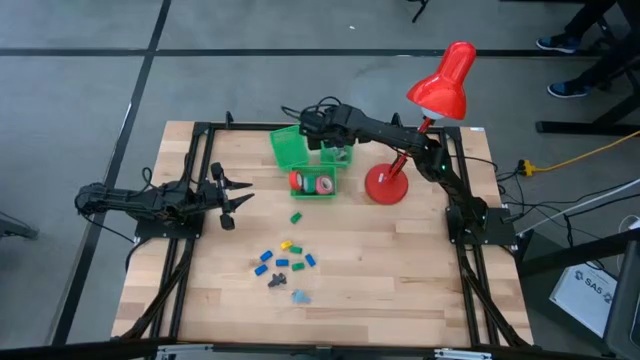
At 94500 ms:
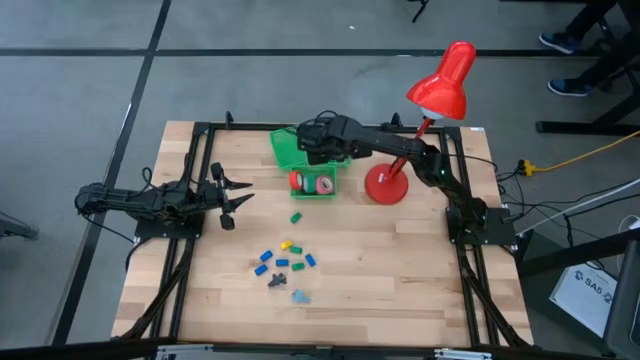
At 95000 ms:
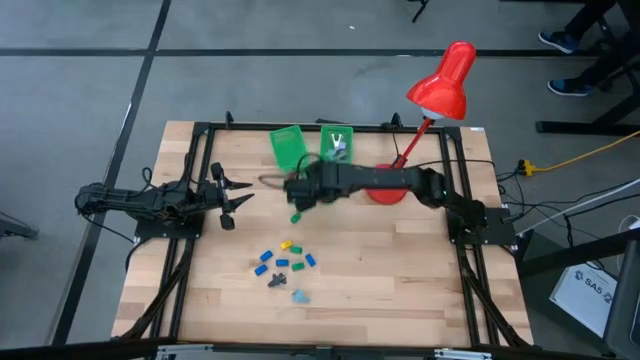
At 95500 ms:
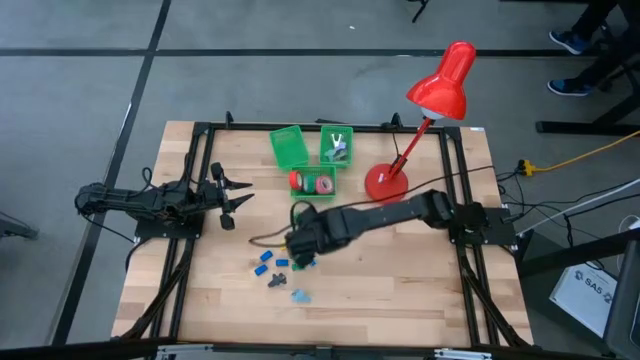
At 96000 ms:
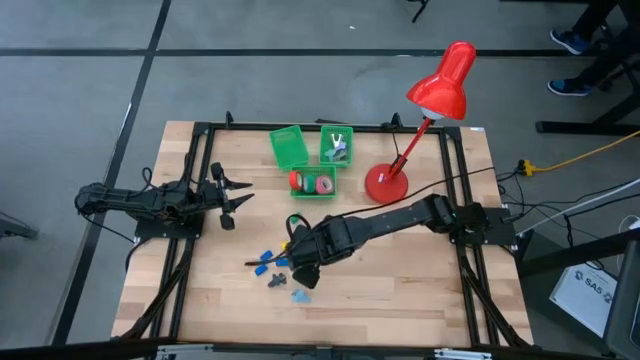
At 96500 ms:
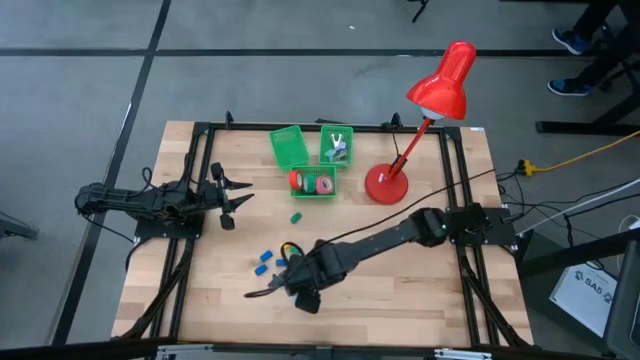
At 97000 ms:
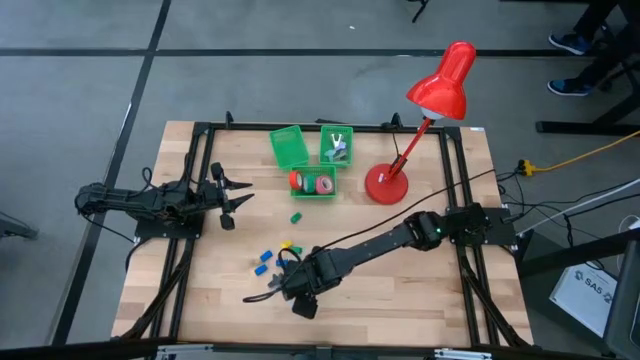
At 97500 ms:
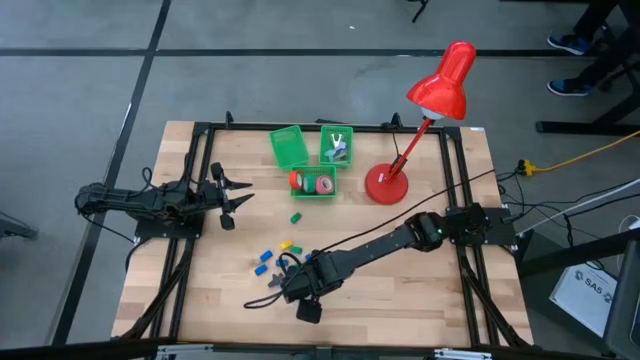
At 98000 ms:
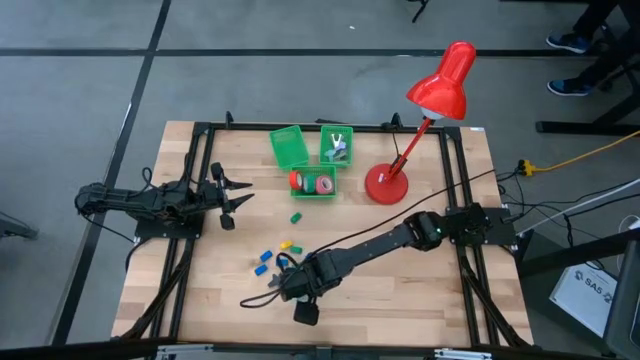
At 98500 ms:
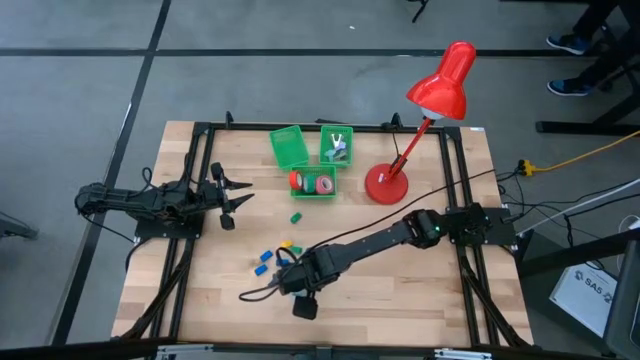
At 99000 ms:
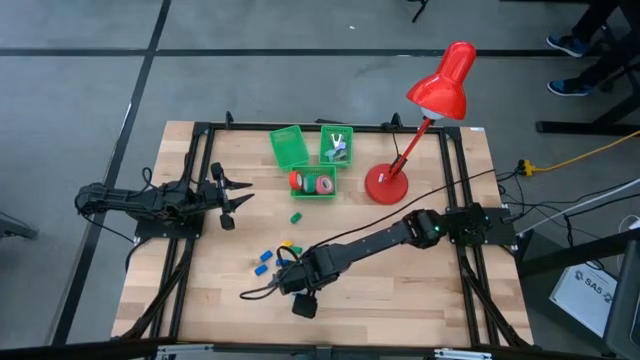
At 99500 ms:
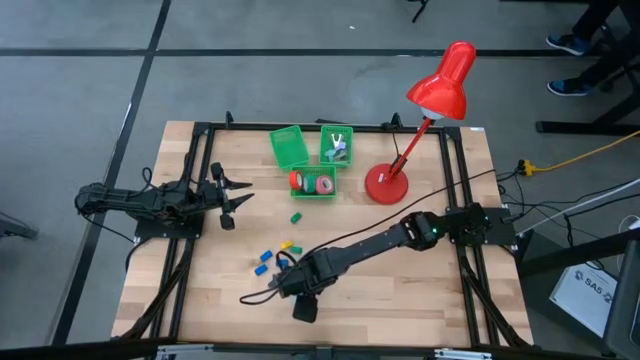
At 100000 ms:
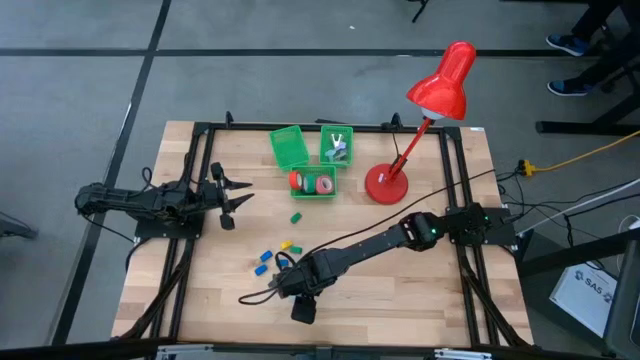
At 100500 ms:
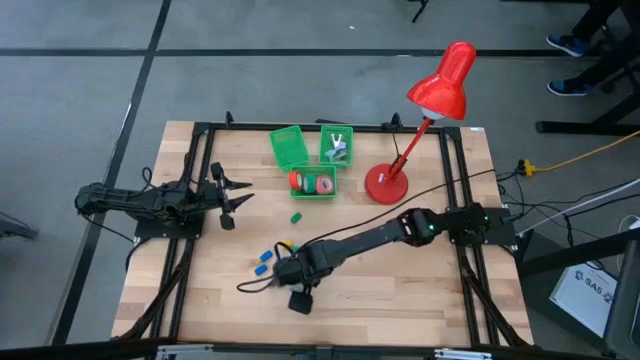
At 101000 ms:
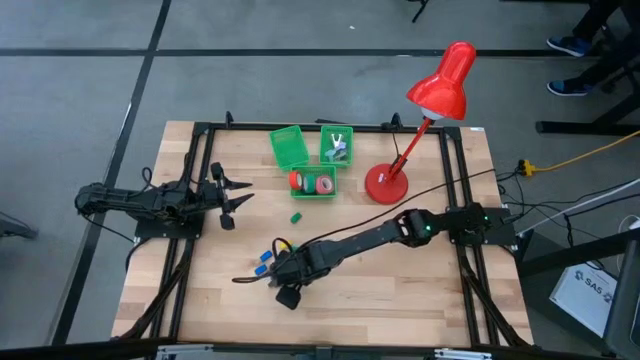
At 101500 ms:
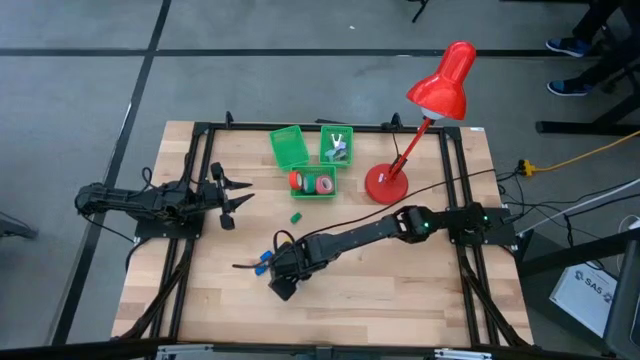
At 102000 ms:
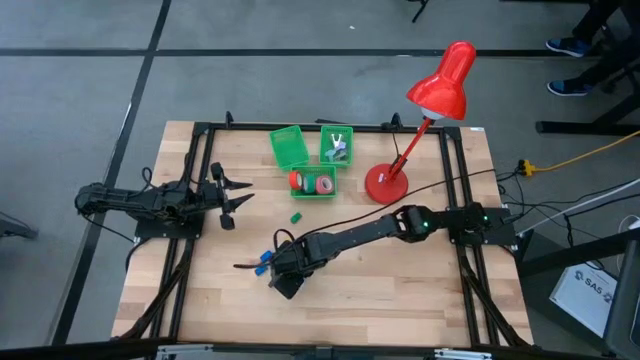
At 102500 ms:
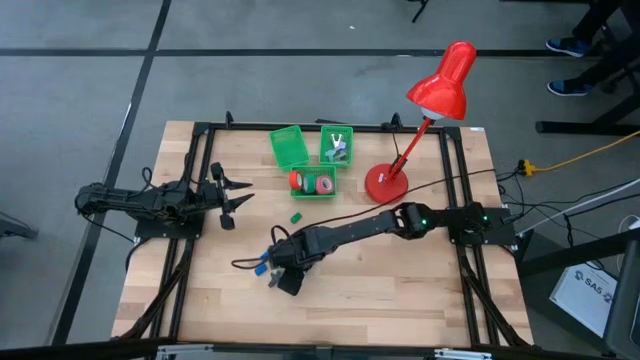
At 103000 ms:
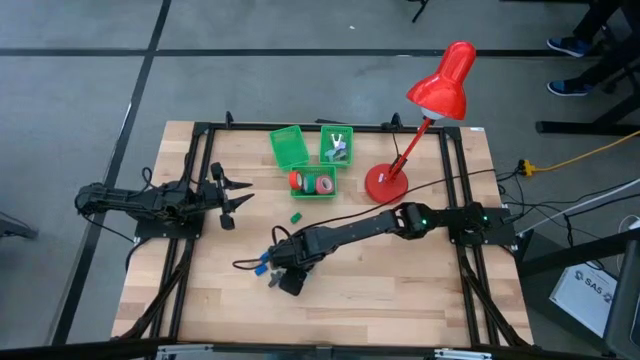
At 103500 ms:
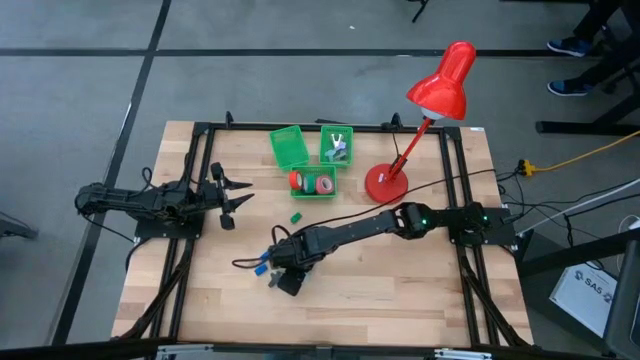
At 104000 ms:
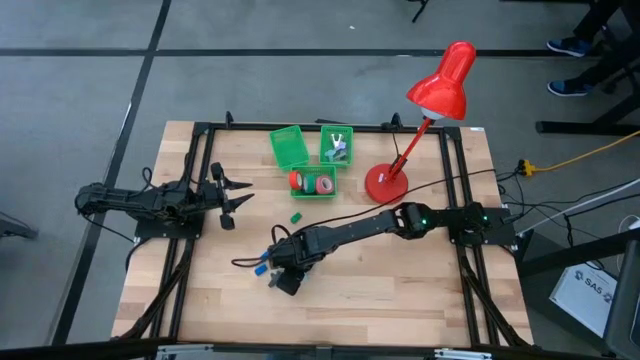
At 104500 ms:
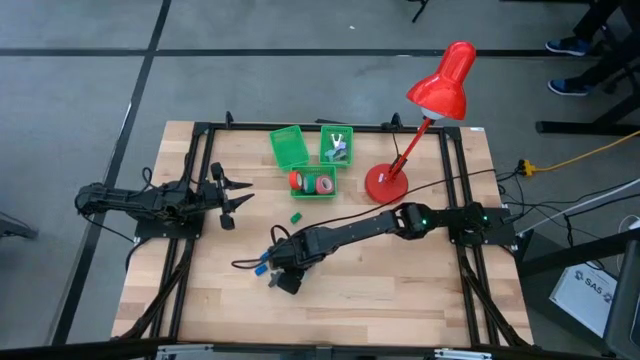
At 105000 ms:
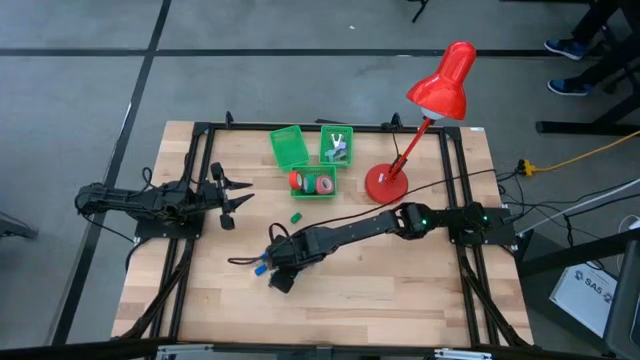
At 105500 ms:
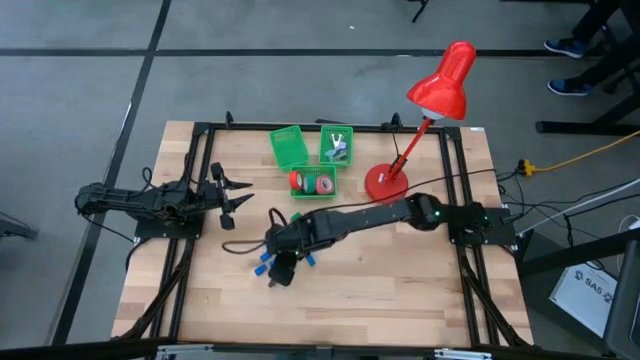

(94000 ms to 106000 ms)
Task: Pick and place Stapler, Stapler remover, tape
Put the blue staple remover into the right green bin

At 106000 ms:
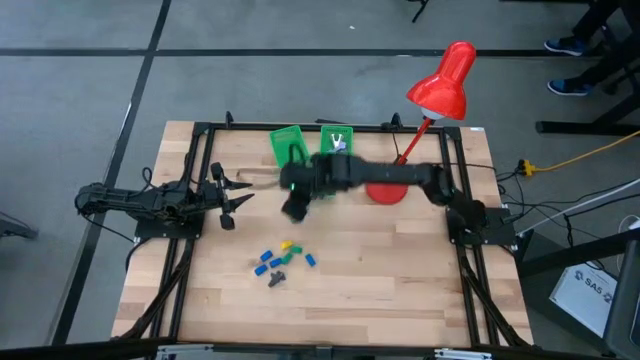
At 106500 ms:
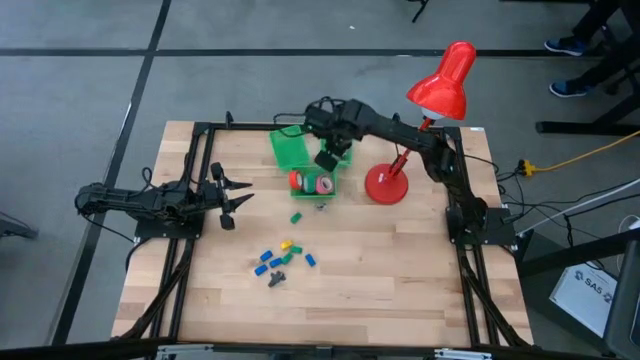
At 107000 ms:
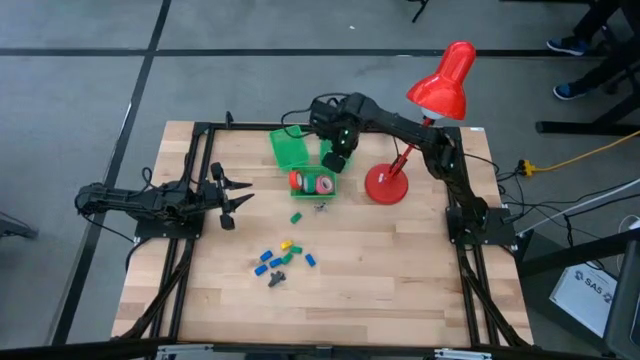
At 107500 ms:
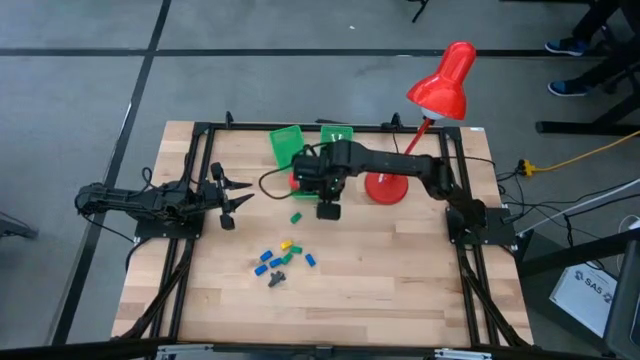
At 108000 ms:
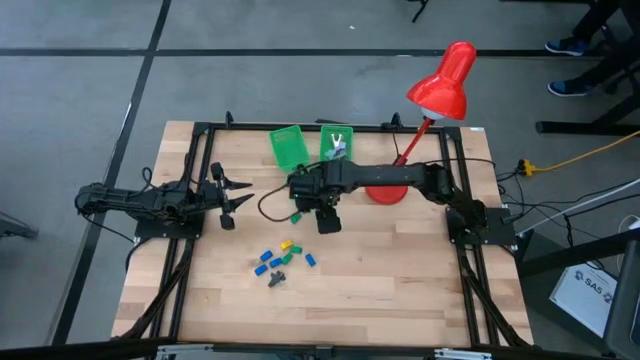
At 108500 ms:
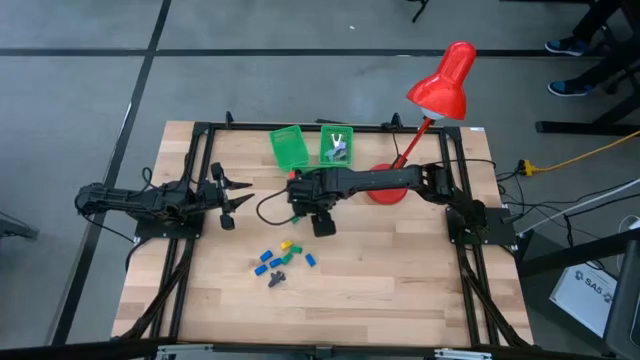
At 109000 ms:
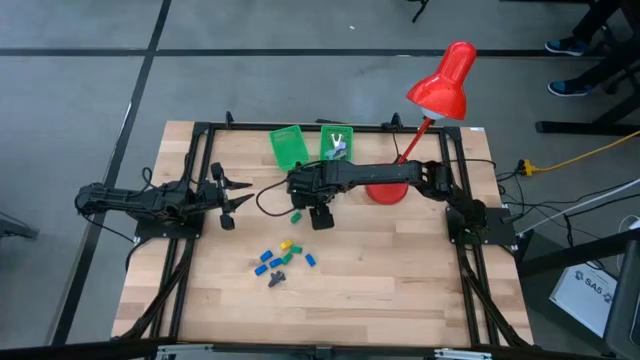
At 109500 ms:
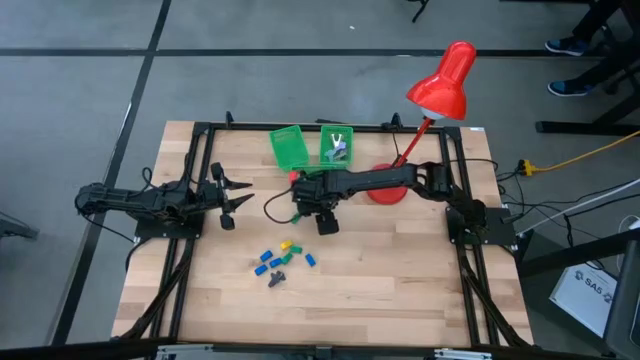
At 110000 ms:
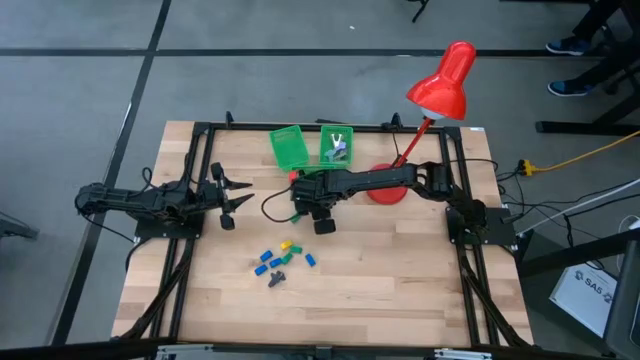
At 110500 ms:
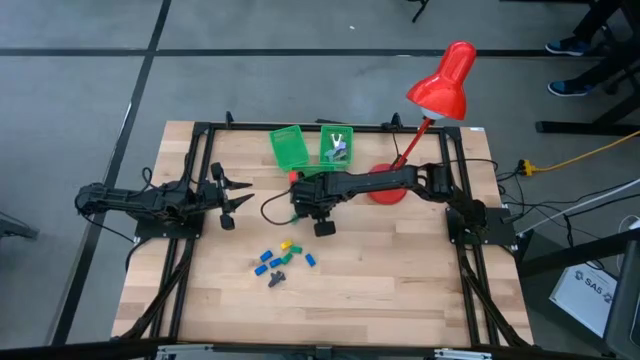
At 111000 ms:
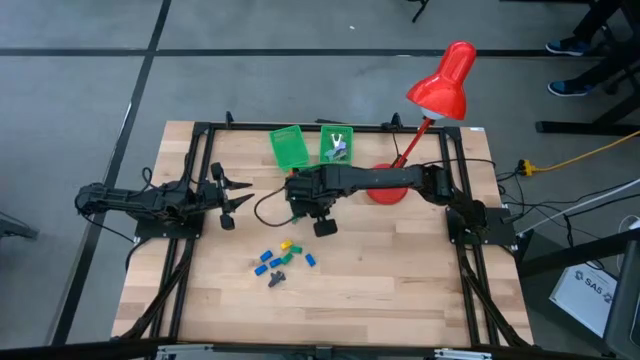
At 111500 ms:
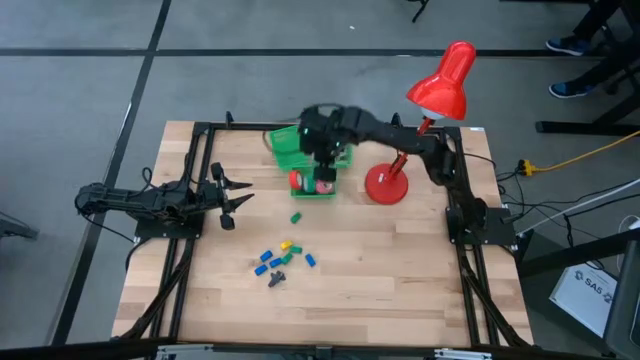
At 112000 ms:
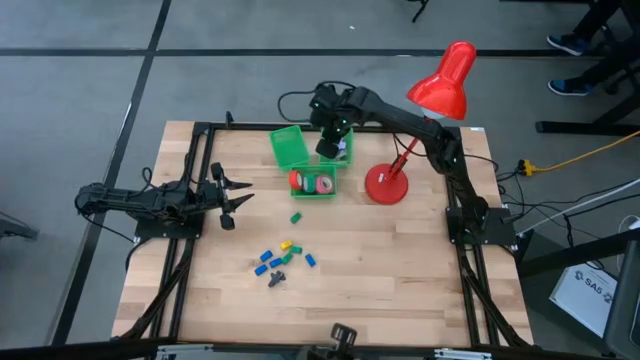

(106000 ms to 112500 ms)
Put the blue staple remover into the right green bin

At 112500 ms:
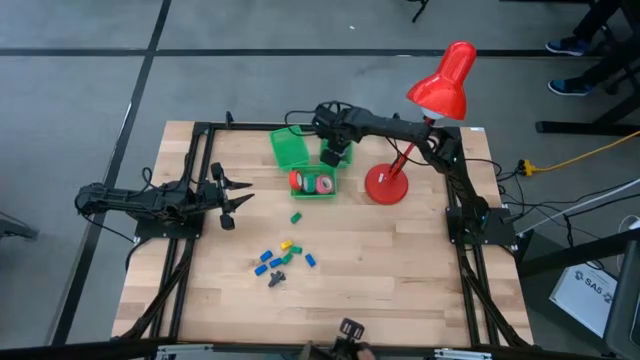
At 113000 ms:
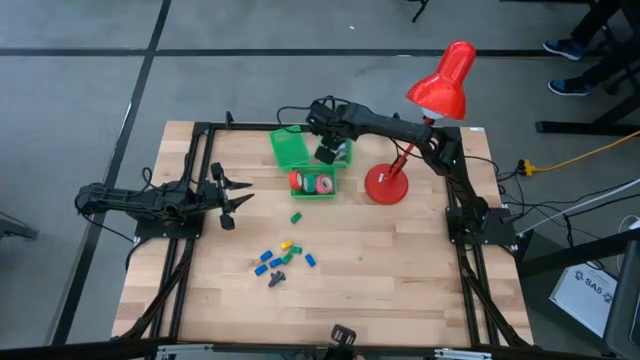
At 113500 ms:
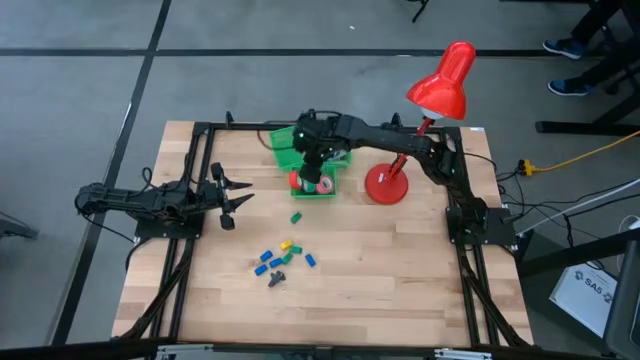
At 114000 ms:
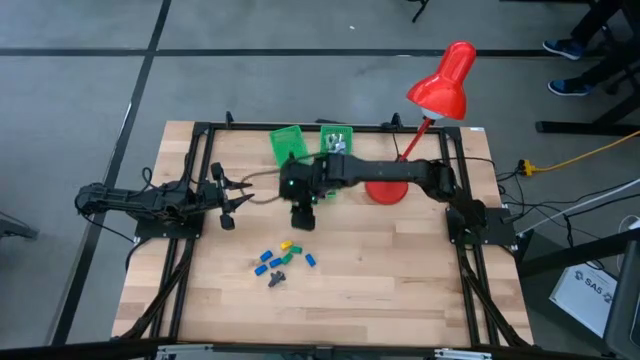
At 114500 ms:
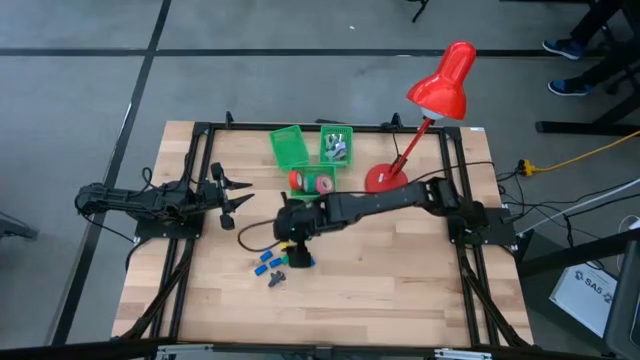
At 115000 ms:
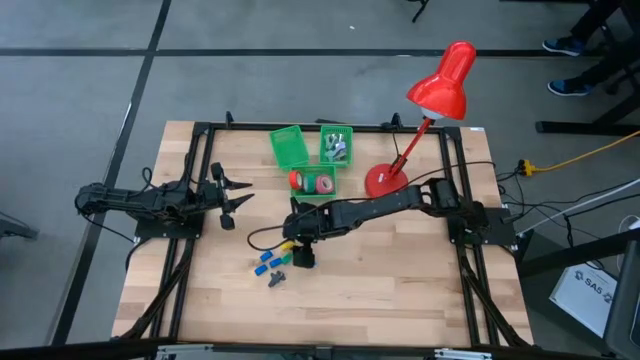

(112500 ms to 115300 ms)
Put the green stapler into the left green bin
